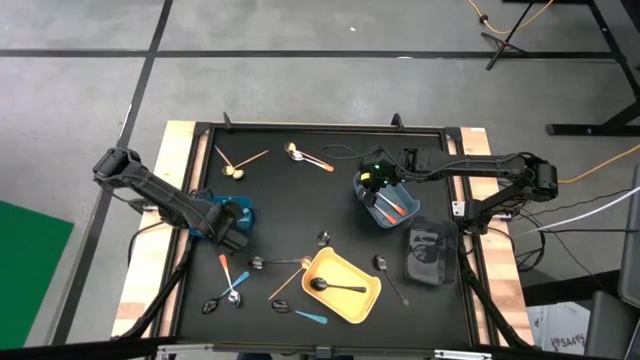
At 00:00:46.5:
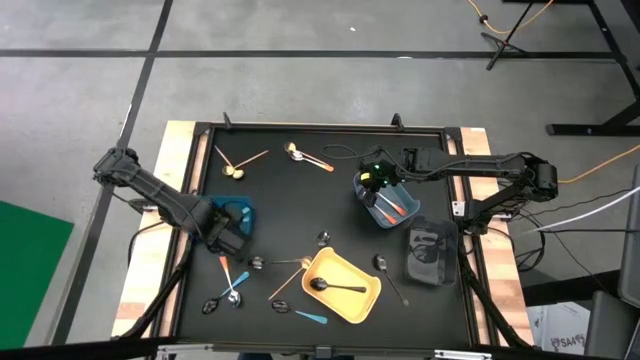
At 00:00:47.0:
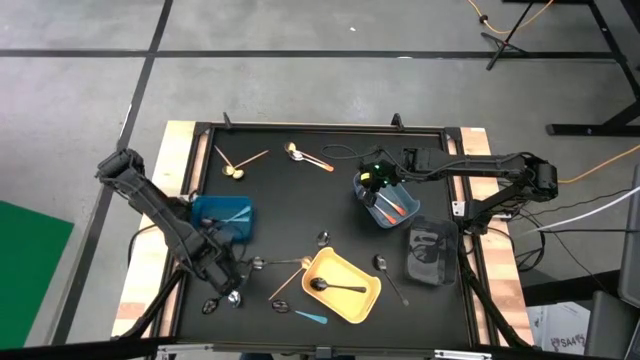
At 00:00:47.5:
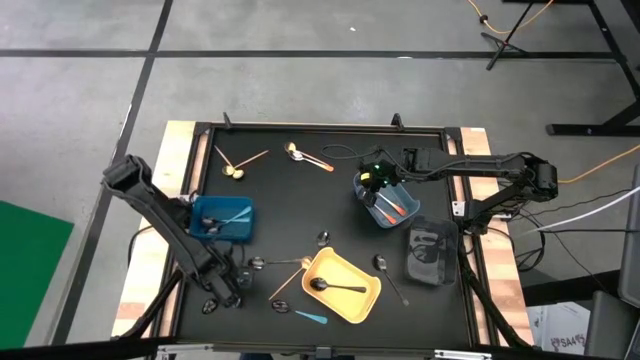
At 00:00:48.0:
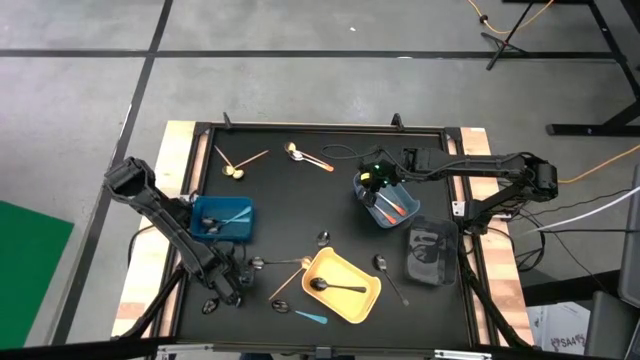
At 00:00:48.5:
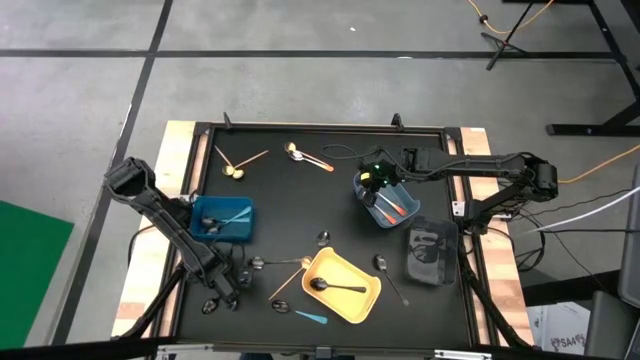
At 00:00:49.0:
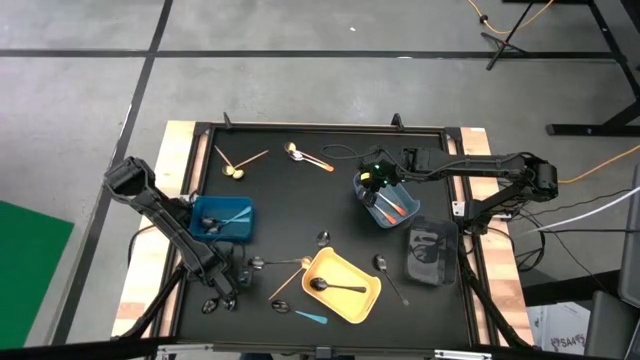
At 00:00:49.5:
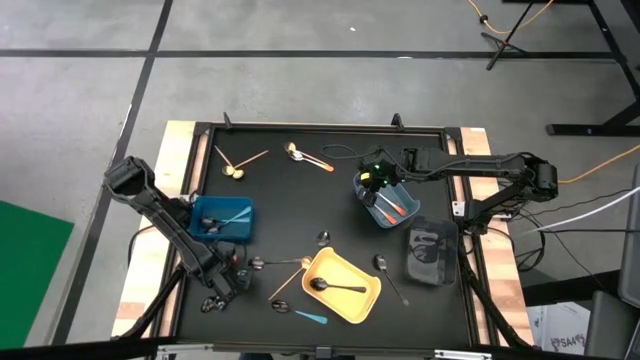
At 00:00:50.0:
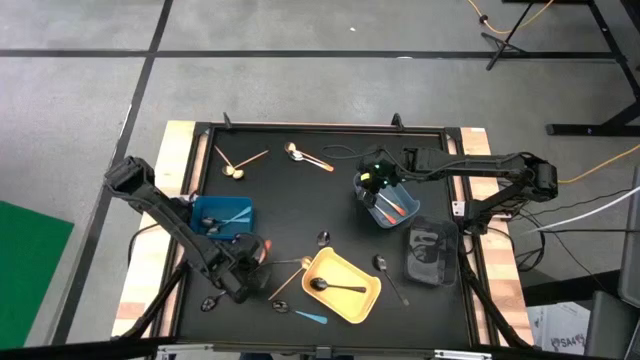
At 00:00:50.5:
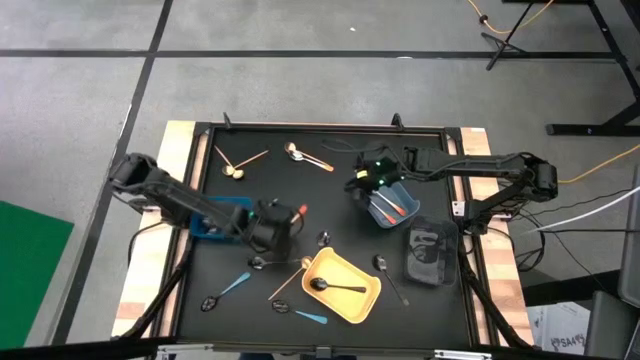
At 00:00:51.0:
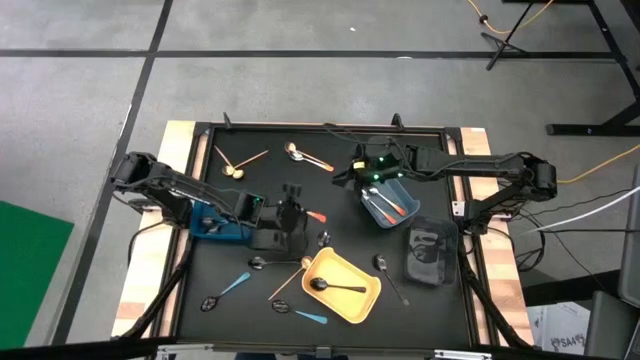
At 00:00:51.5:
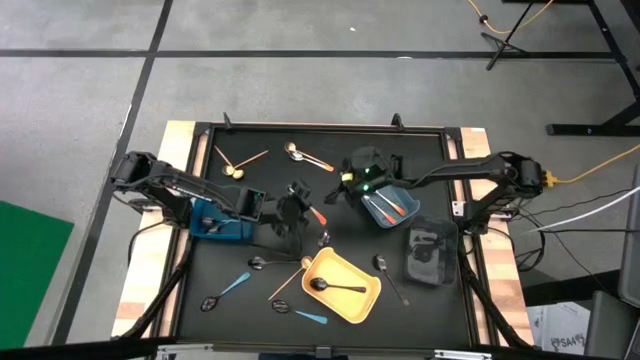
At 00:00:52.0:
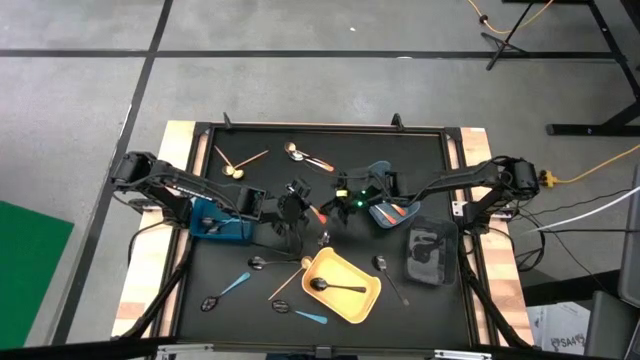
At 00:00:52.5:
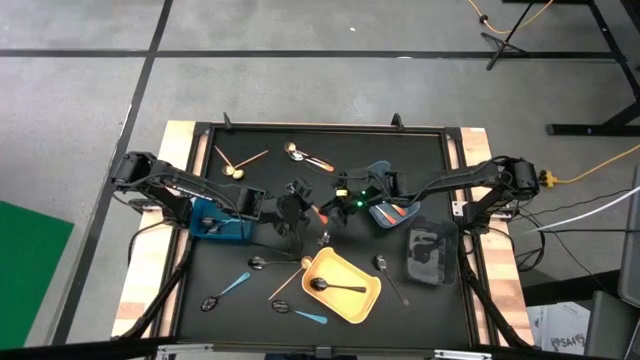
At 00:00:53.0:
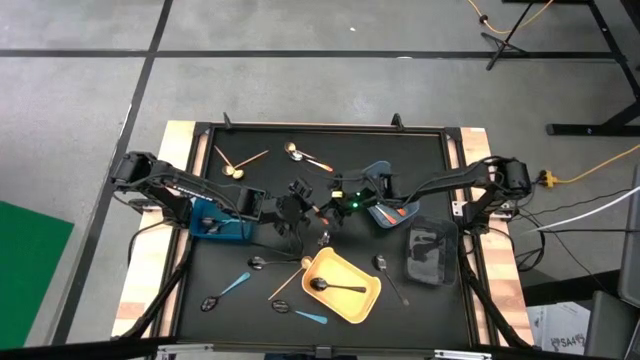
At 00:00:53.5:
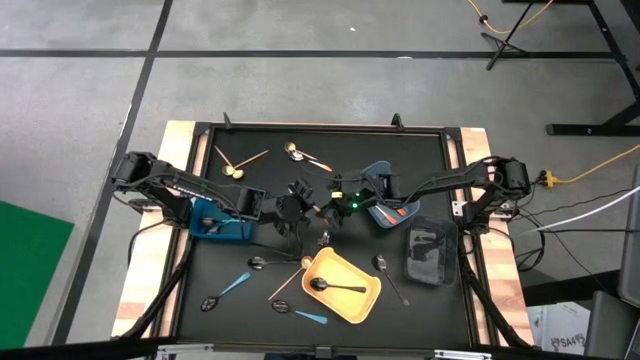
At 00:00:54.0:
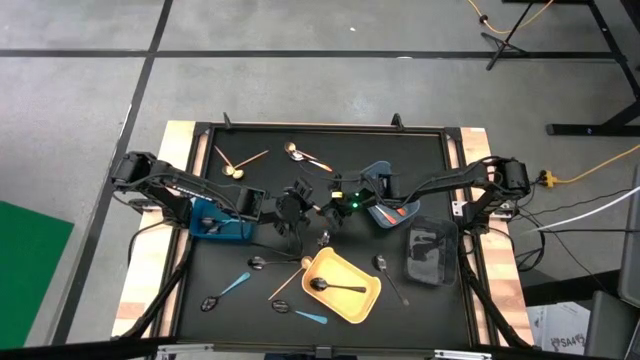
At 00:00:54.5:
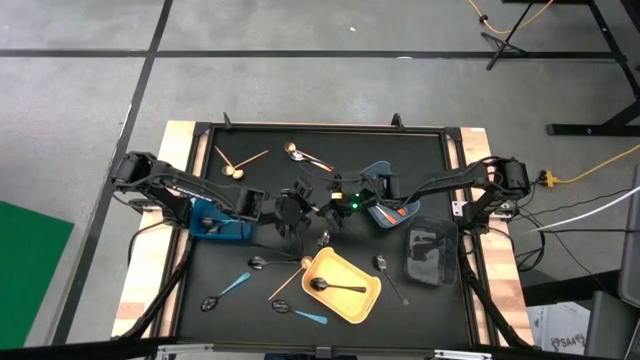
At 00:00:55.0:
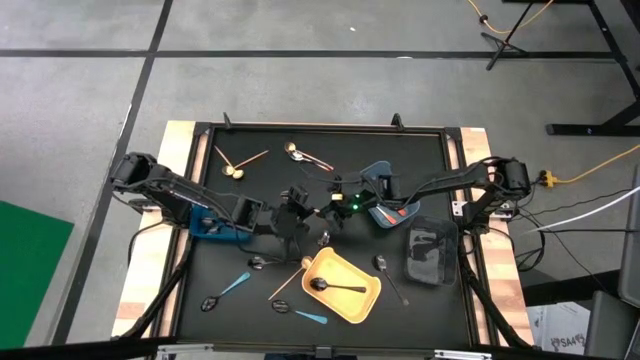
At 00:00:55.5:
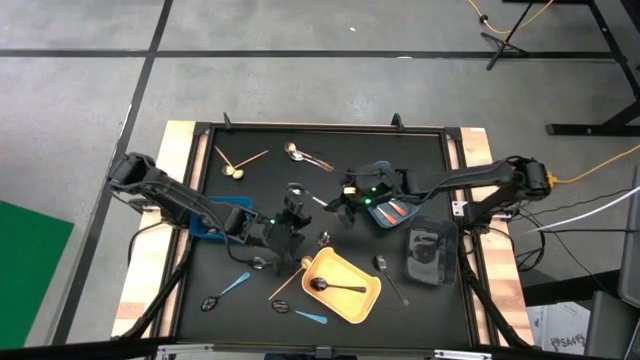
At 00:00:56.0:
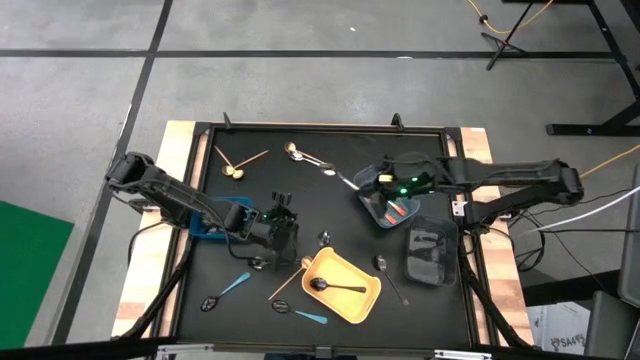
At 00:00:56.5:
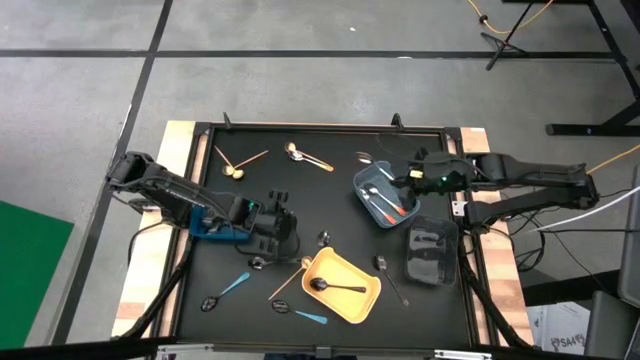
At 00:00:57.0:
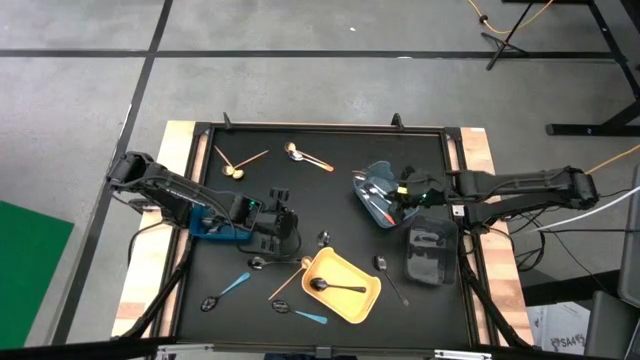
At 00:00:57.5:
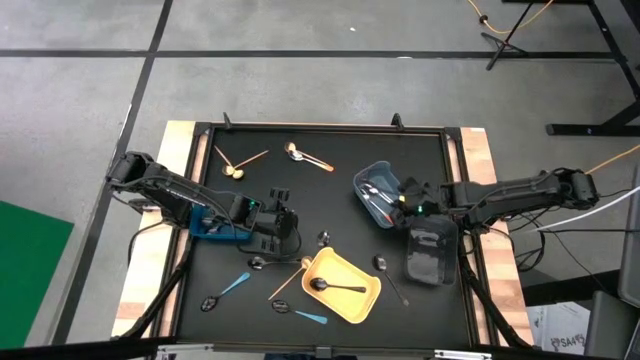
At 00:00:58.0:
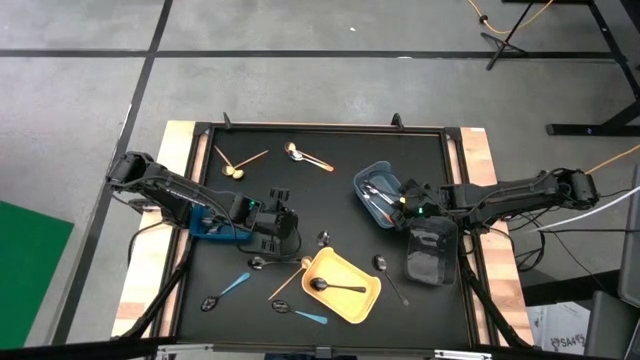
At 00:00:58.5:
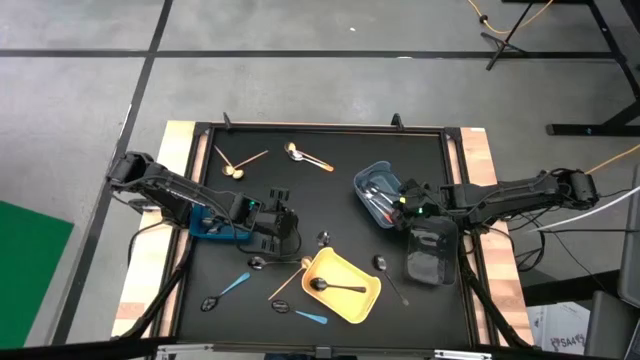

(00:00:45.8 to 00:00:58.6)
Task: Sort silverware by color (type)
Put the orange spoon into the gray bin

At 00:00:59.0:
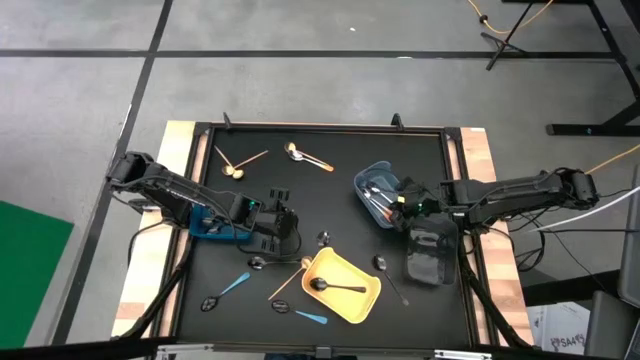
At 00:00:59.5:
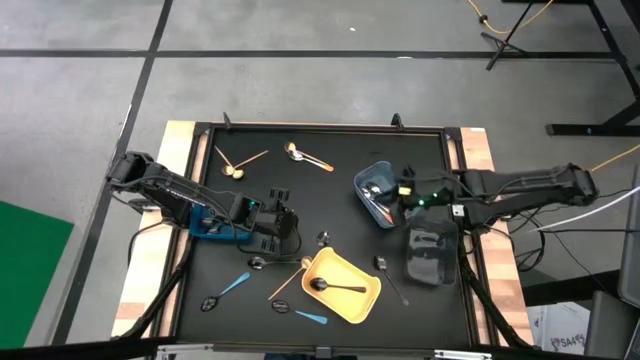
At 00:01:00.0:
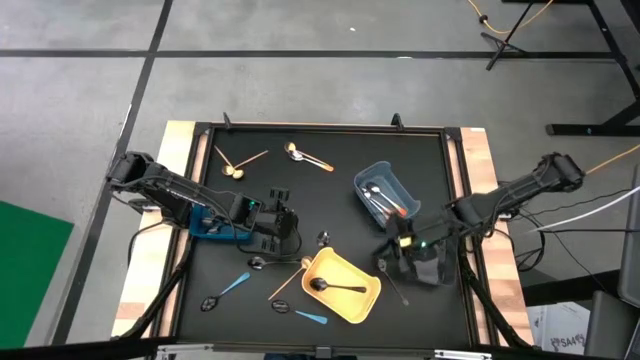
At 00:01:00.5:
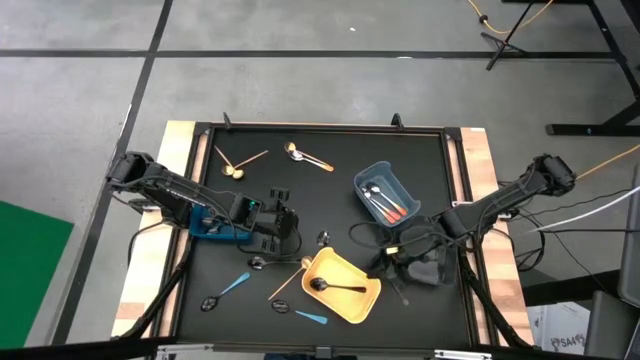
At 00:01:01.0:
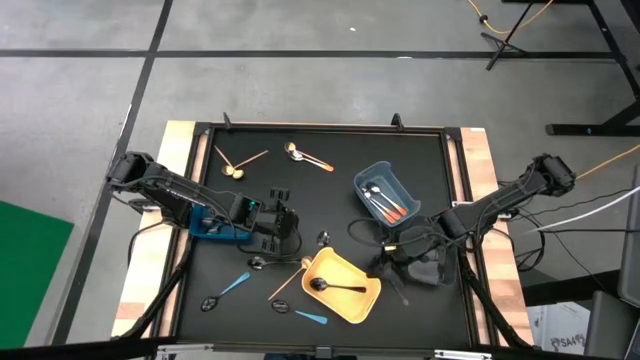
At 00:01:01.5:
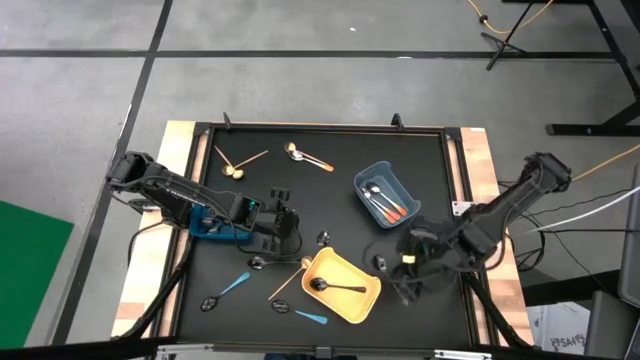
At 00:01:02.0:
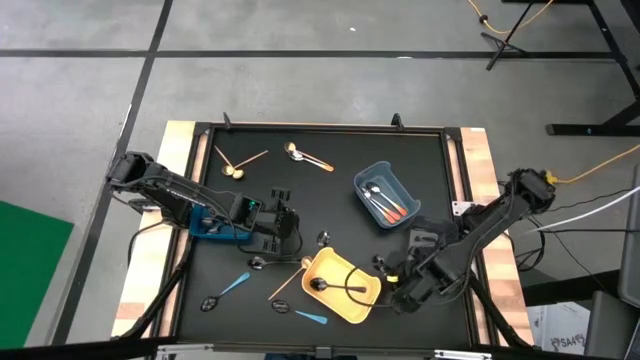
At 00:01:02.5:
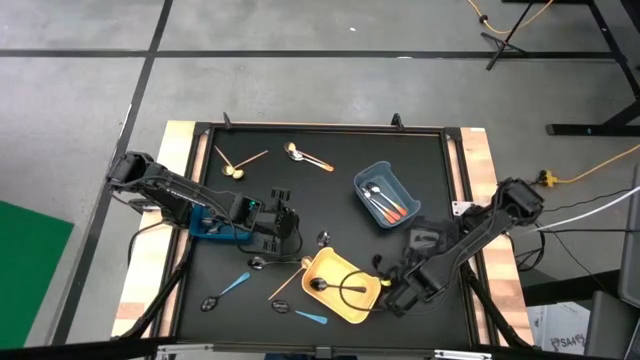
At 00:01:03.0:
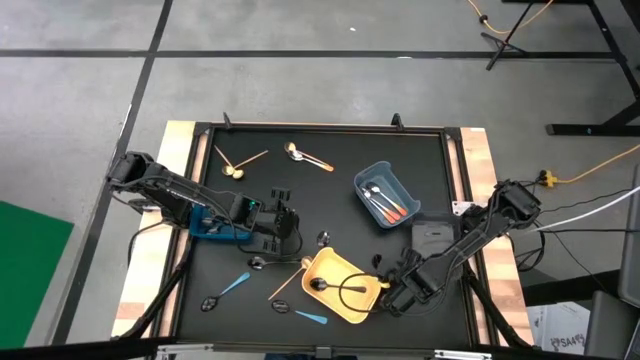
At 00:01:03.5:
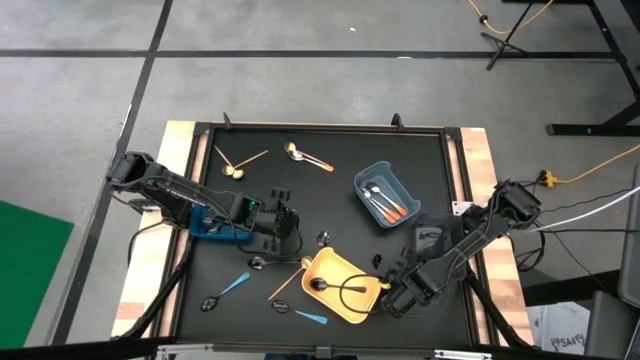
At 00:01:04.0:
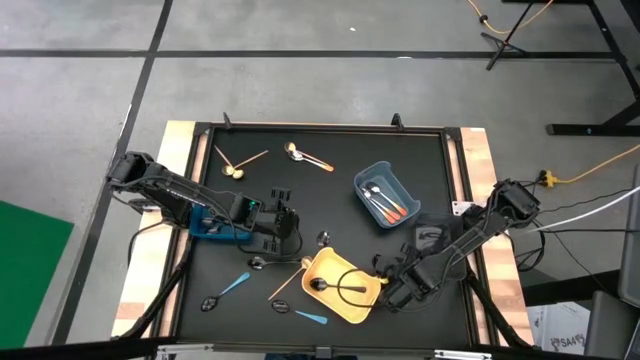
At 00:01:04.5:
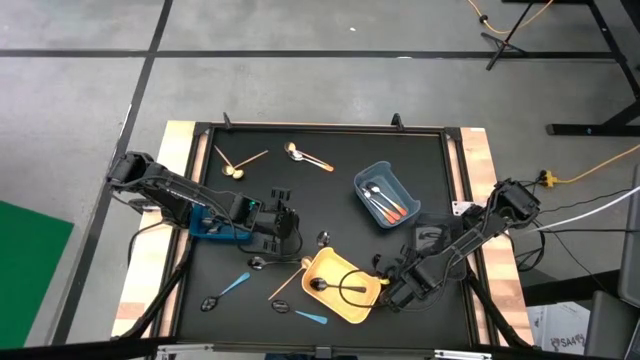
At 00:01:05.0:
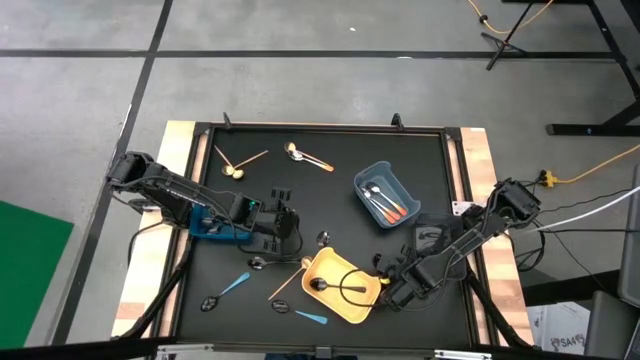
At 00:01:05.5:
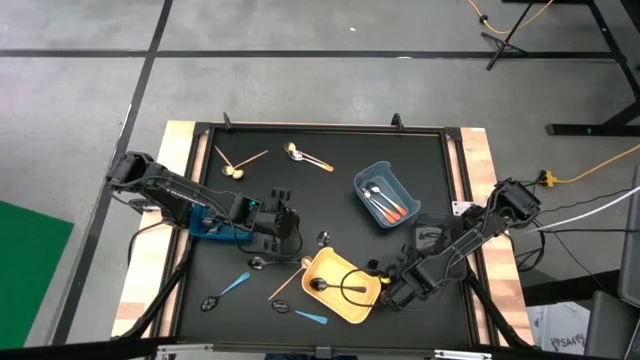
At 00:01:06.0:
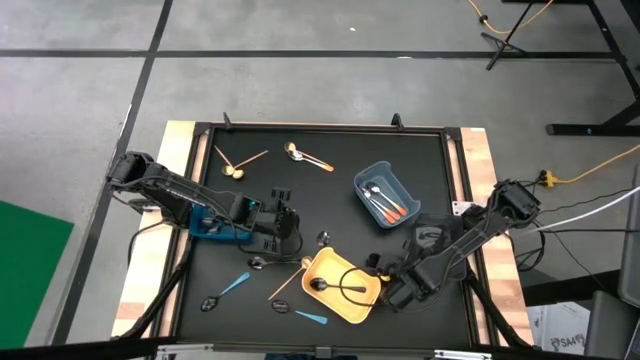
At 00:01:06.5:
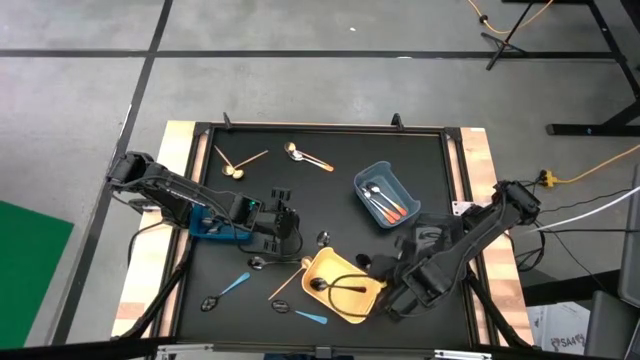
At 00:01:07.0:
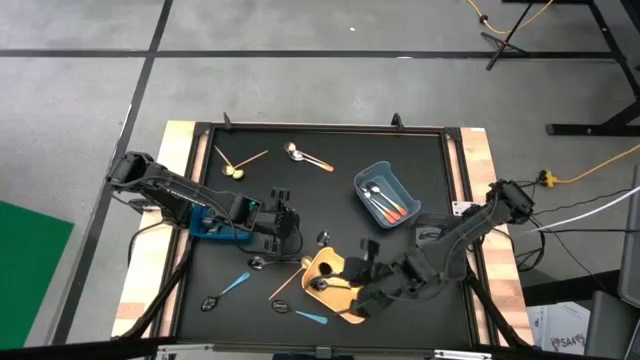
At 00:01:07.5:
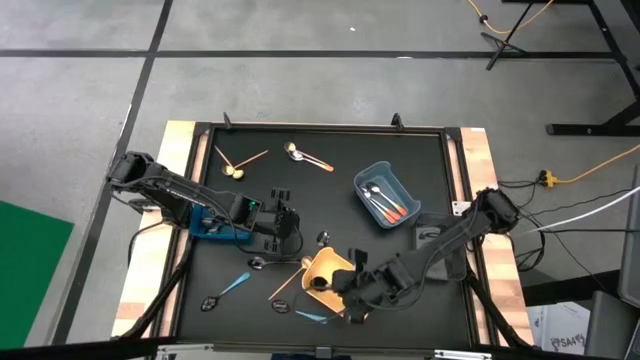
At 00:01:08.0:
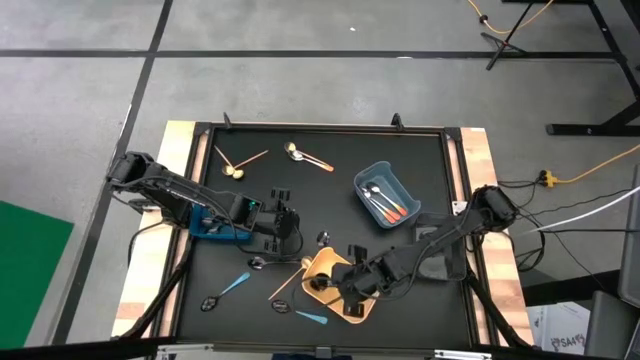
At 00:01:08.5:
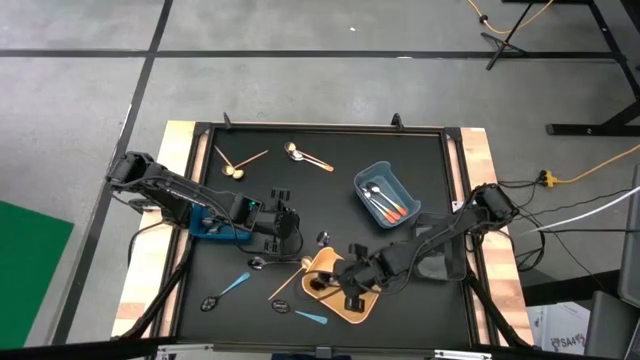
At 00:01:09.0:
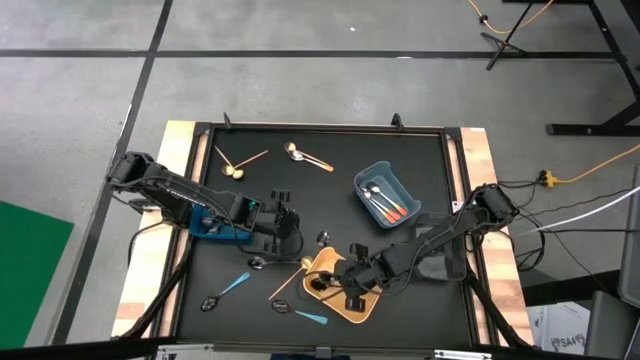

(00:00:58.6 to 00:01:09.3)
Put the black spoon into the yellow bin
